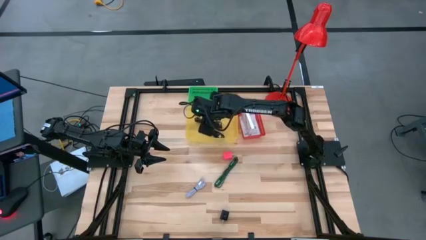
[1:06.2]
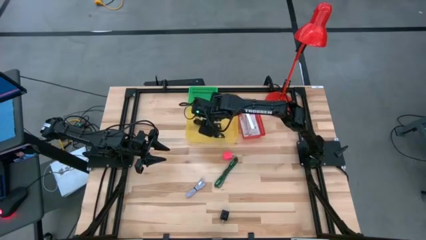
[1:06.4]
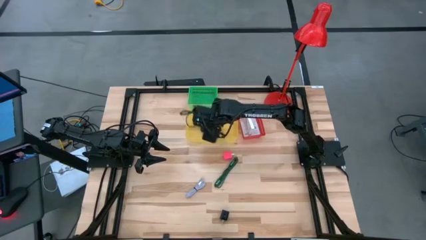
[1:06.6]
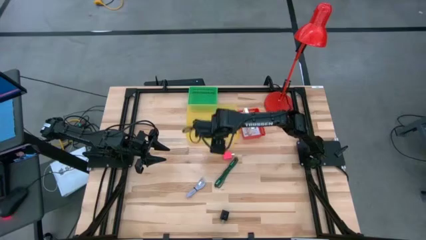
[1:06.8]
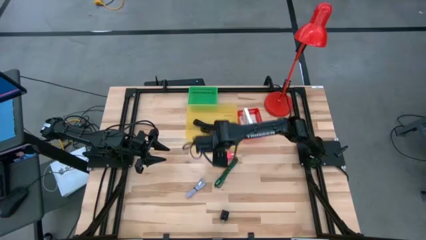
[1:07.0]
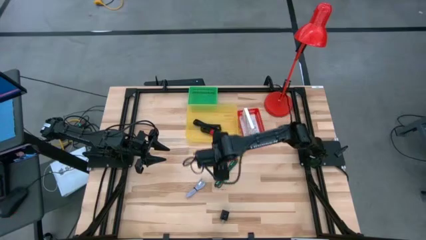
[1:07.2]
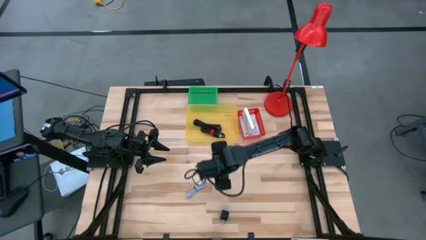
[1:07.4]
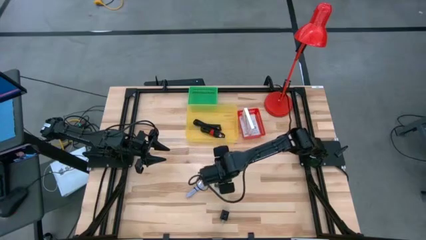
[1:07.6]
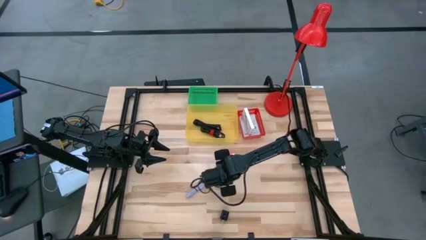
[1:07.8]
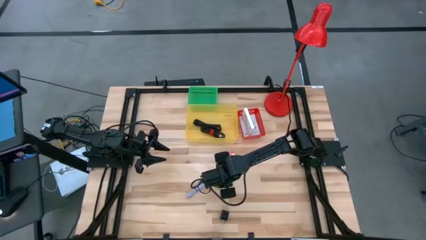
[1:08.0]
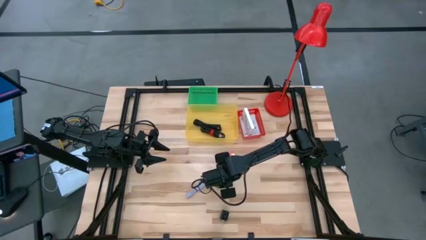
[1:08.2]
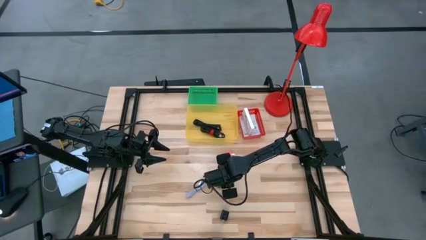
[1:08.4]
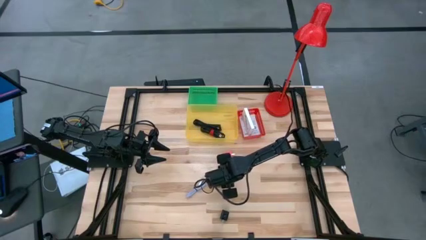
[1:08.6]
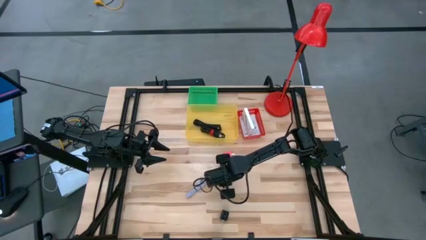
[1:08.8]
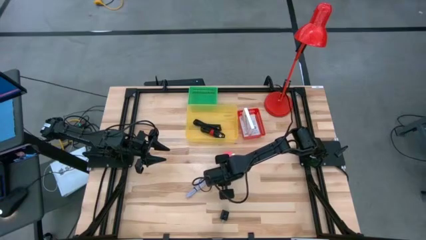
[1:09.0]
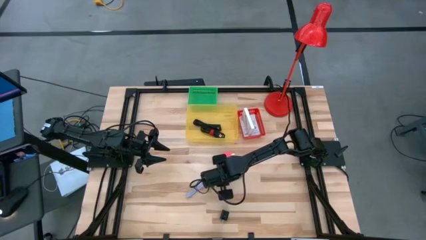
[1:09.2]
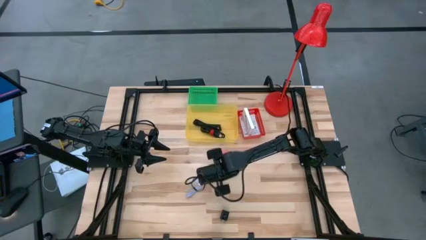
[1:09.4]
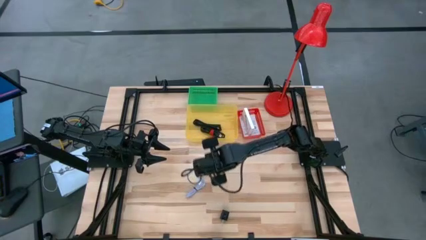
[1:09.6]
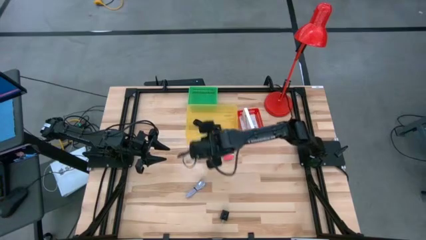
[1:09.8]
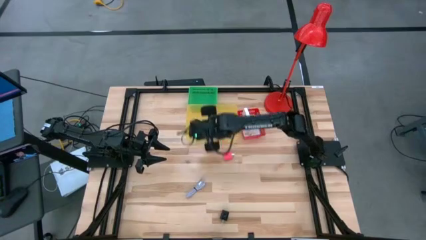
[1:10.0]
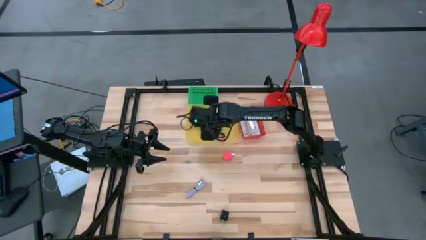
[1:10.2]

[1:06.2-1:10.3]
Task: Pick and place items into bin
Put the green charger cable into the yellow bin

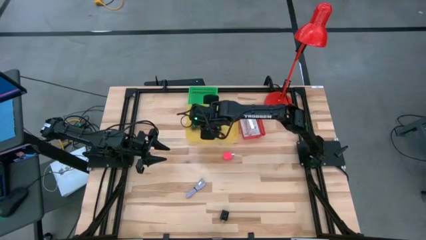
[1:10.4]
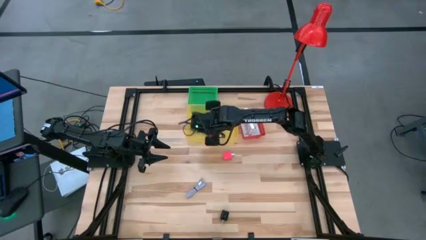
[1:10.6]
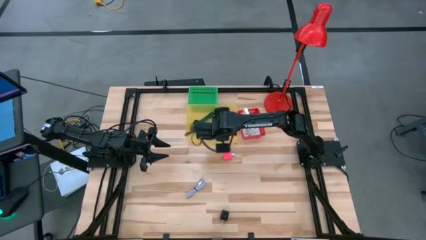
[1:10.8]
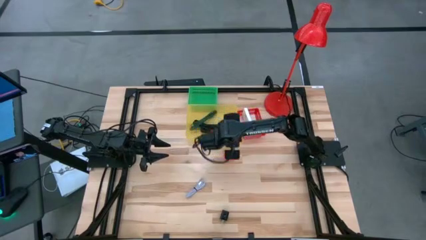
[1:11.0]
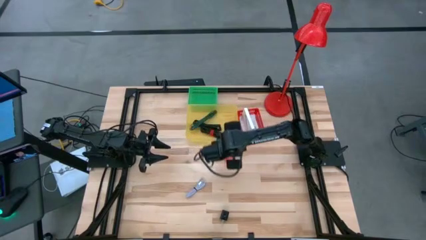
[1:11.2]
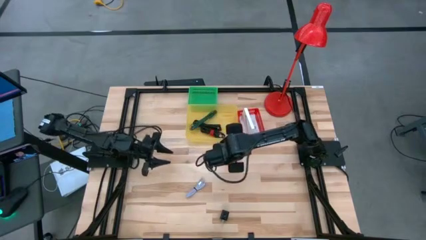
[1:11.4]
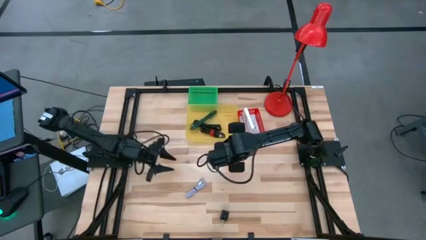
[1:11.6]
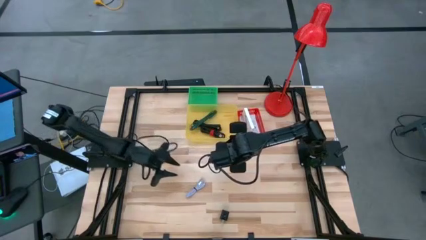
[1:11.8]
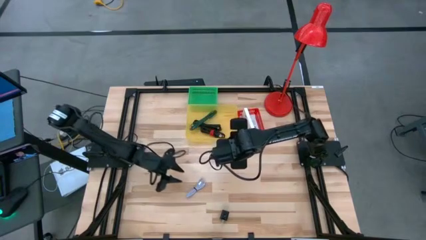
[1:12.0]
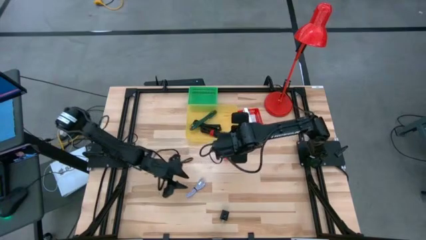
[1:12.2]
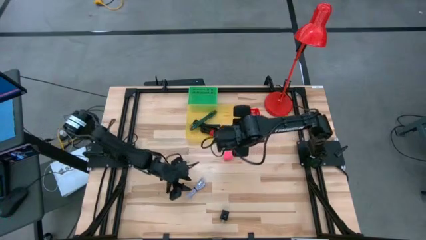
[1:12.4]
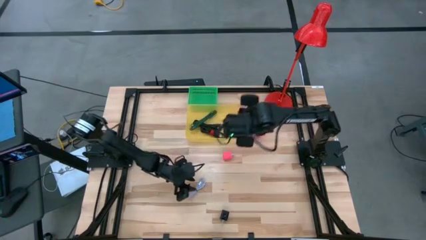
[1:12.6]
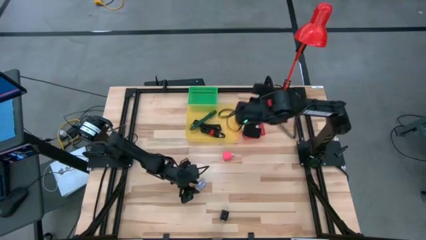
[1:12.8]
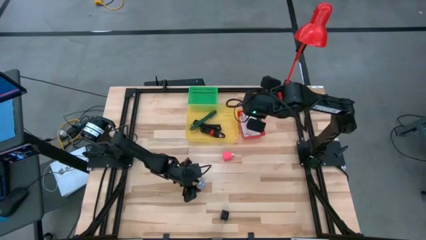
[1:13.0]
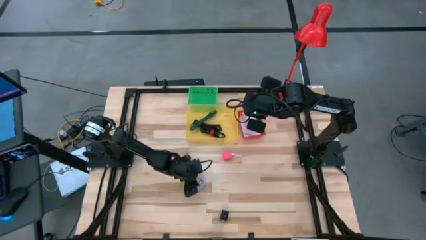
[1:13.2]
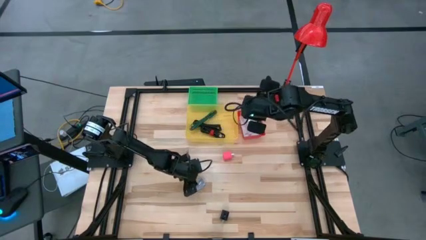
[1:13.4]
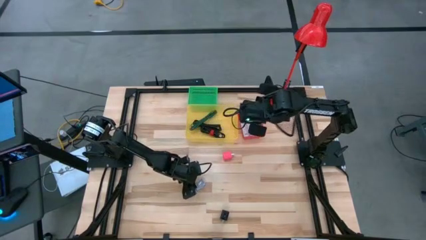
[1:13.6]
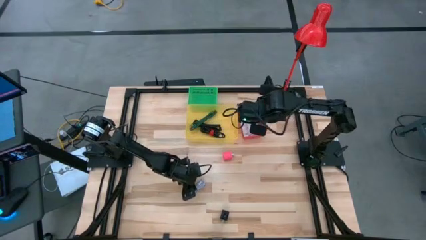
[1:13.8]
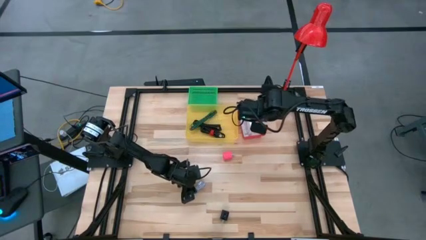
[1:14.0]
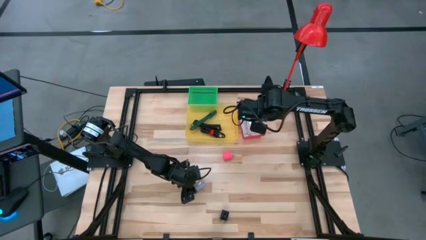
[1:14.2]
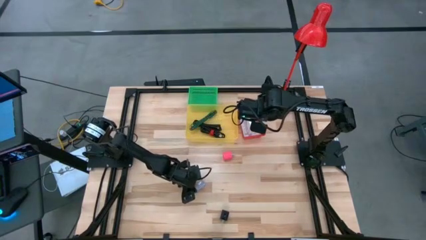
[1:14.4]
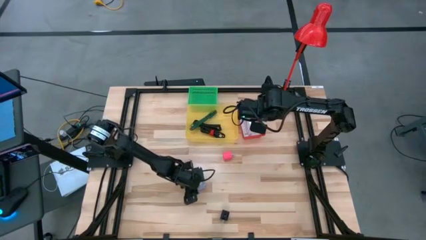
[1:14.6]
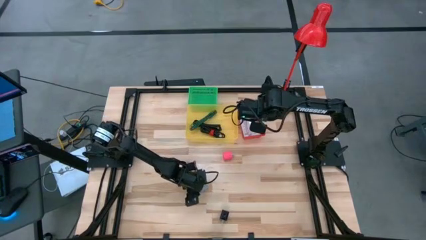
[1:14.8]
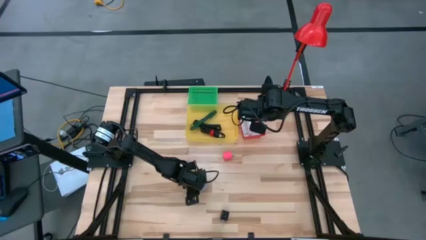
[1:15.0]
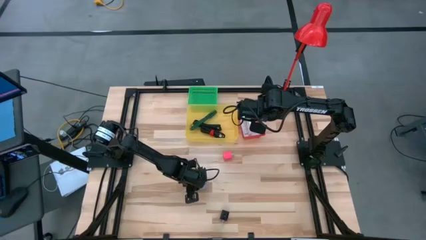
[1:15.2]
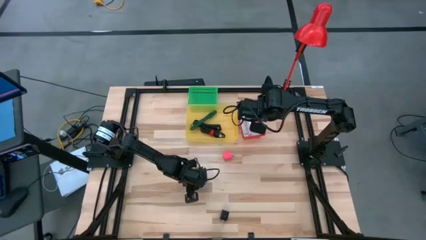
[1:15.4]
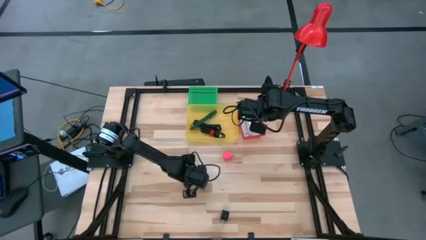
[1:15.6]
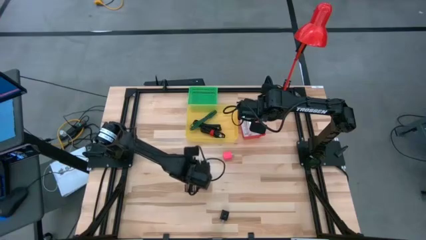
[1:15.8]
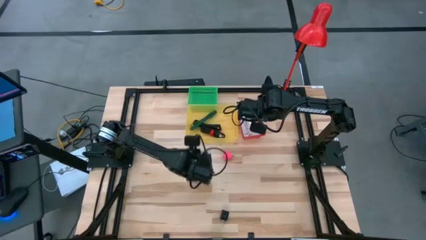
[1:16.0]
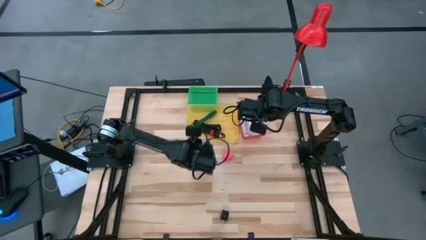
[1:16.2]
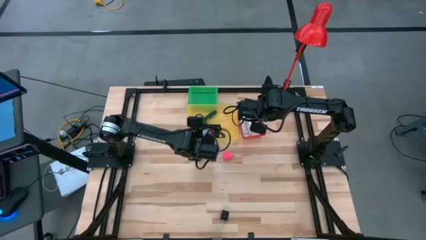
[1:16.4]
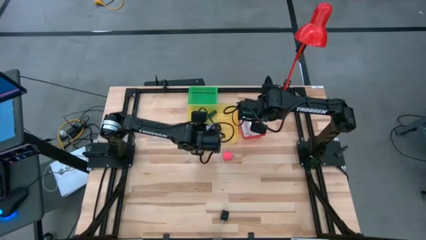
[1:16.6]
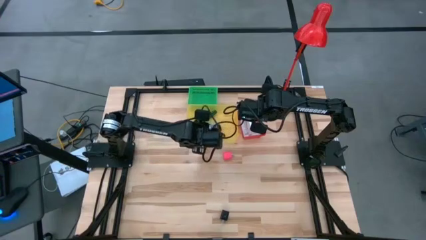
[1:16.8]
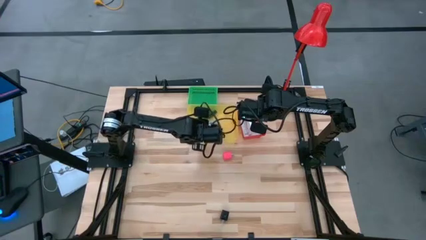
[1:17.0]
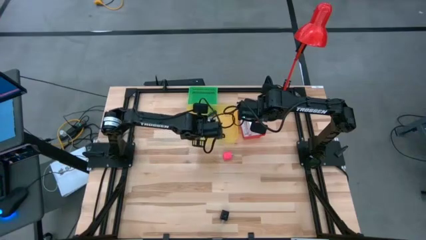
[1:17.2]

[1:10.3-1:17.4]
Put the white charger cable into the yellow bin

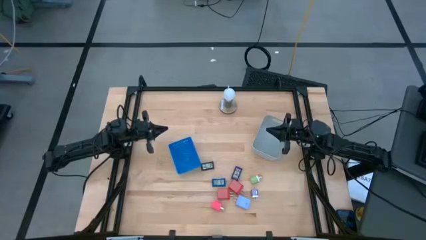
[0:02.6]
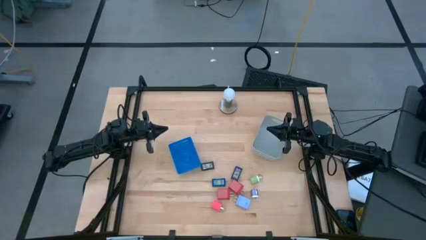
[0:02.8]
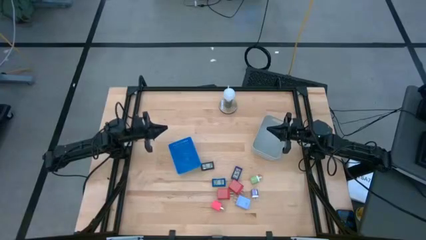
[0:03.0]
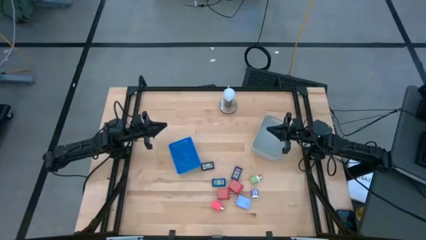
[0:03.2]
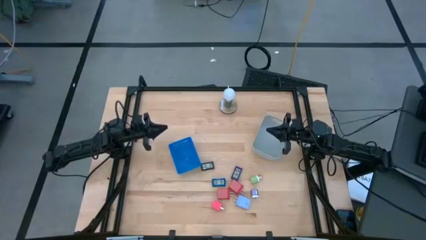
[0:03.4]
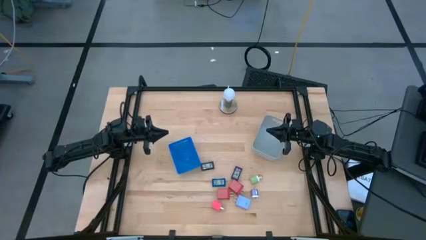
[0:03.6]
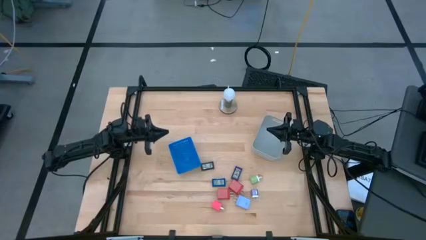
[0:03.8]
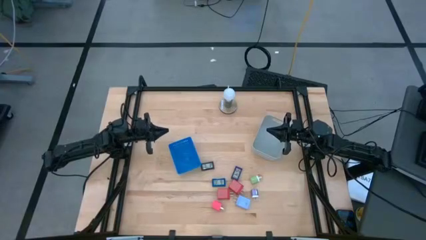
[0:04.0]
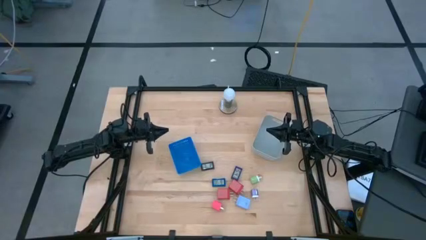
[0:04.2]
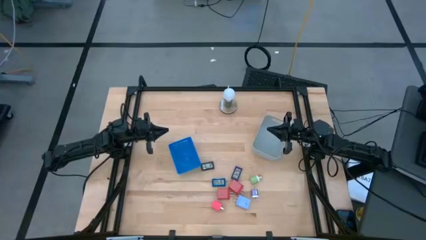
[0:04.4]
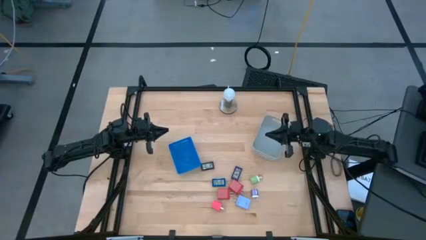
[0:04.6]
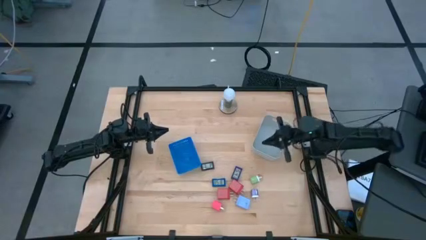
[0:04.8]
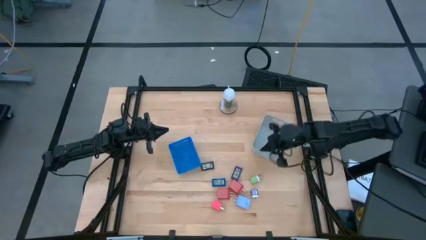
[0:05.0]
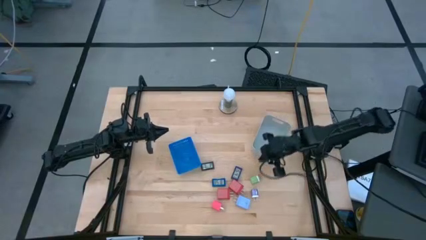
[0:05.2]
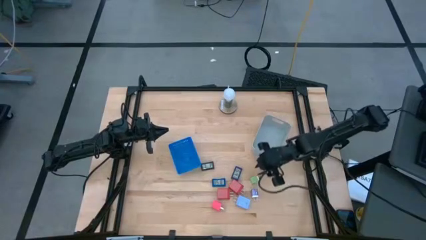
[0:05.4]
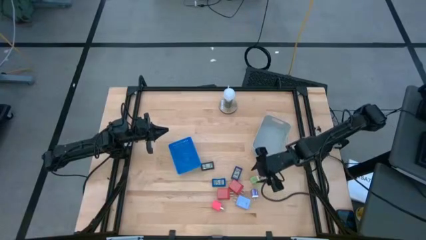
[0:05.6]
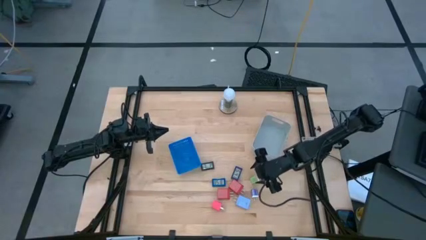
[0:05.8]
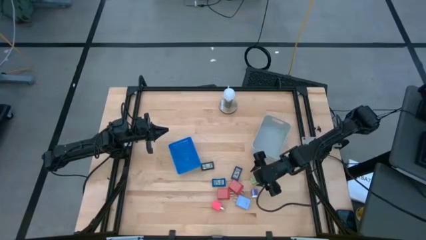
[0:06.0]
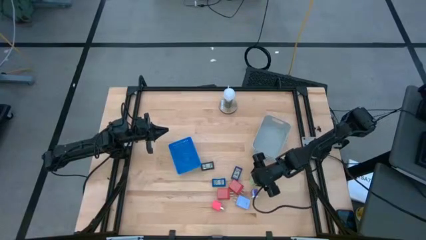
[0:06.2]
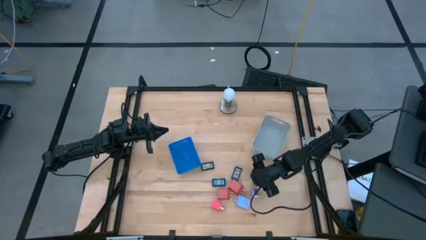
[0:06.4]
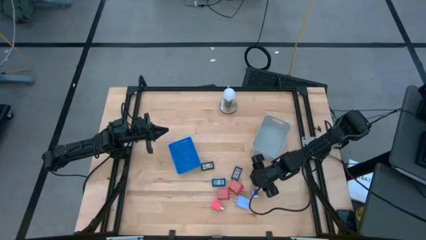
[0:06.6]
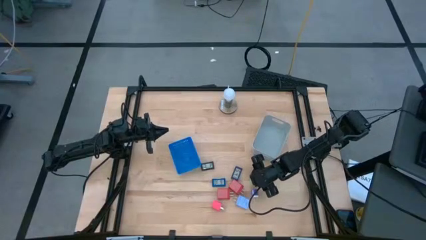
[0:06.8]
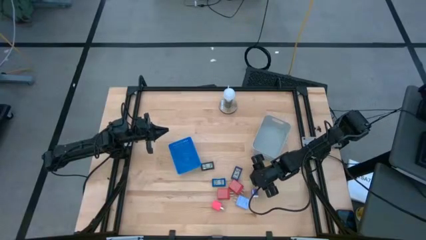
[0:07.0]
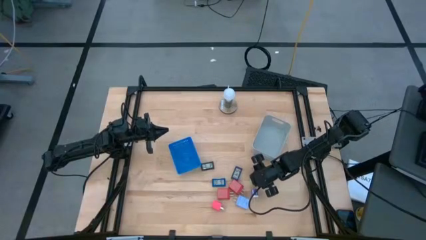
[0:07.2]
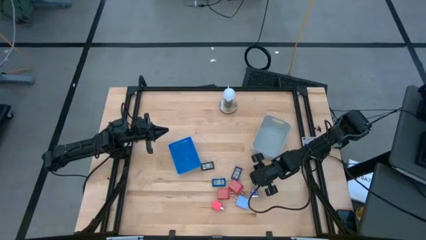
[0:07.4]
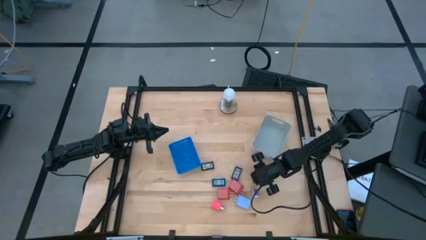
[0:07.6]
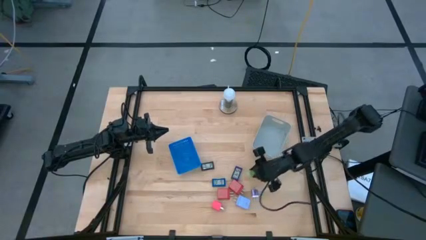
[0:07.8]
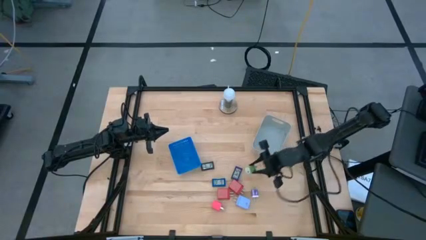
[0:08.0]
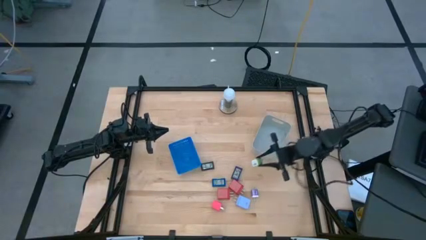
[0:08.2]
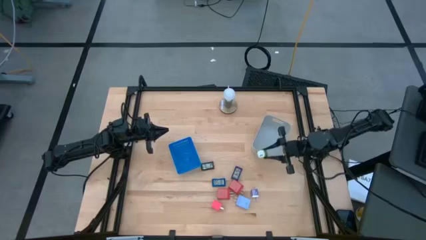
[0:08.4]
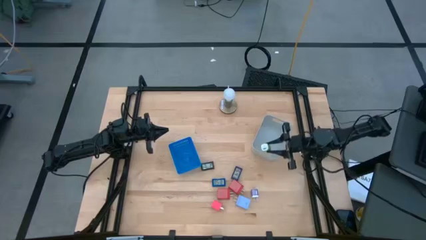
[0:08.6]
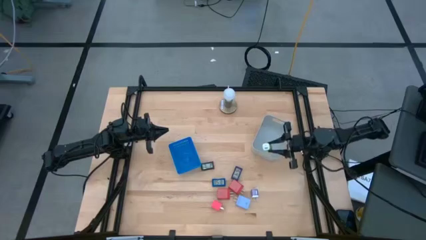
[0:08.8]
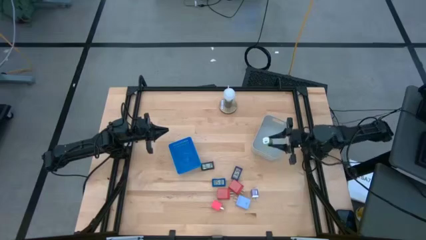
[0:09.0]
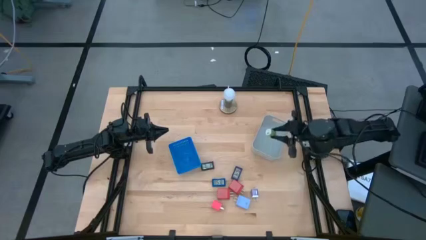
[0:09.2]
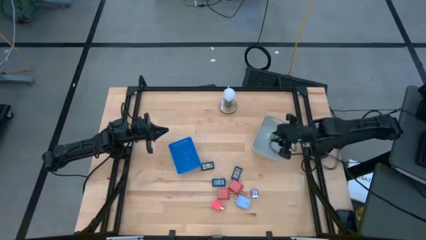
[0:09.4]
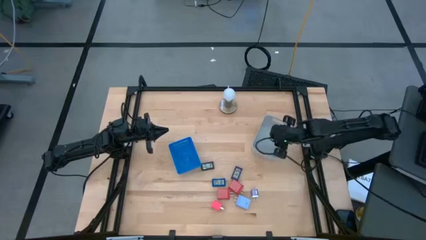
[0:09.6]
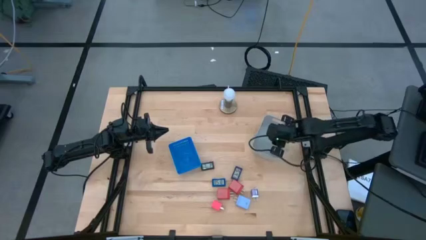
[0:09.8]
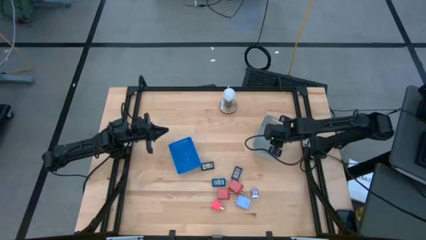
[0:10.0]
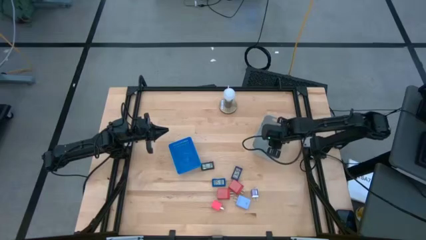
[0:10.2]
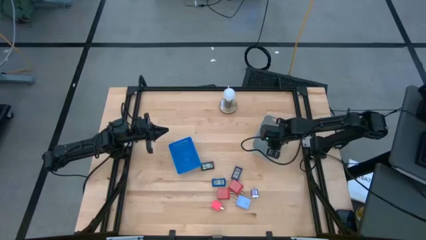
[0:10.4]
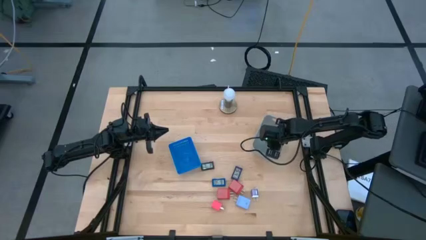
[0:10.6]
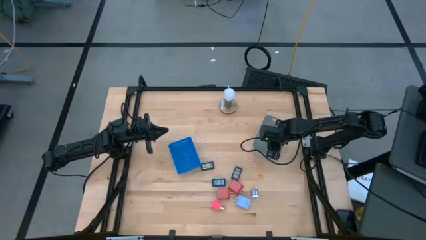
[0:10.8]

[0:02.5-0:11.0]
Task: Pick & Place Office items
Put the green changer adapter into the gray bin
